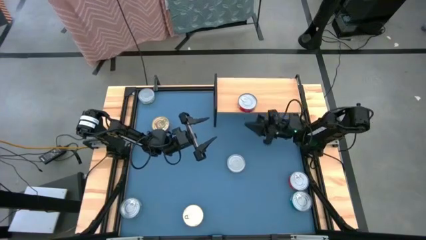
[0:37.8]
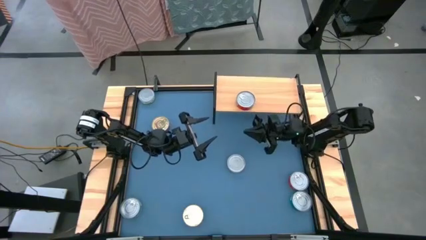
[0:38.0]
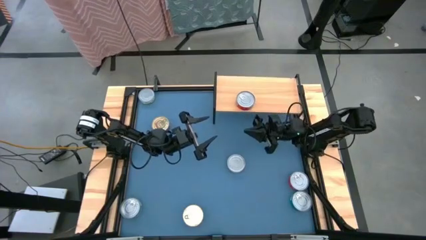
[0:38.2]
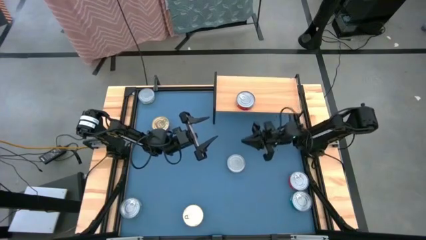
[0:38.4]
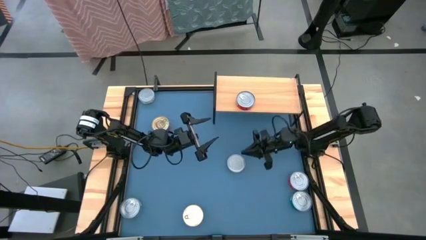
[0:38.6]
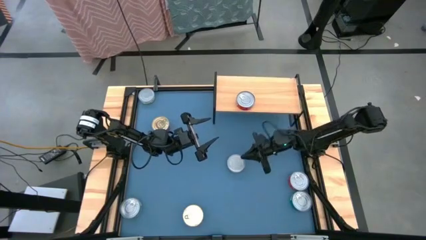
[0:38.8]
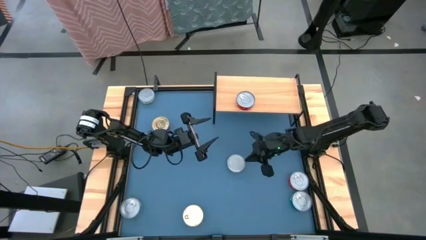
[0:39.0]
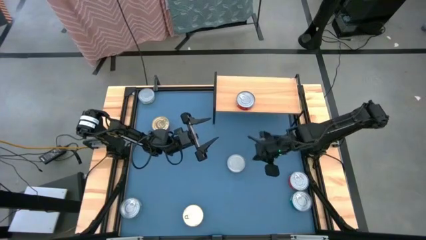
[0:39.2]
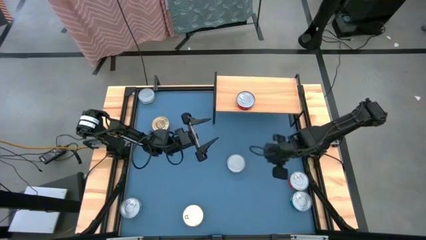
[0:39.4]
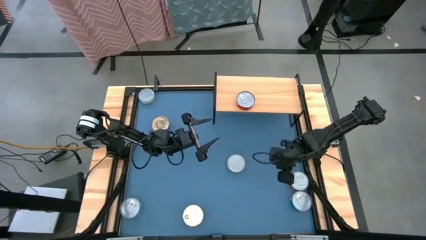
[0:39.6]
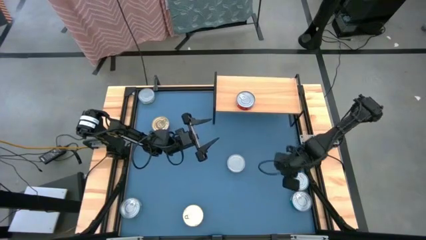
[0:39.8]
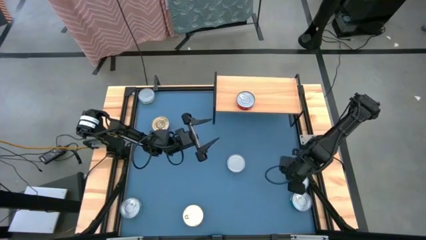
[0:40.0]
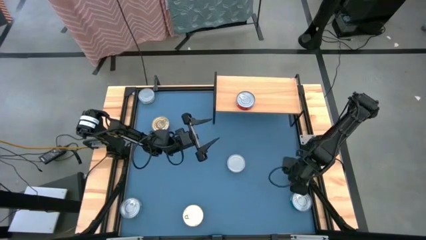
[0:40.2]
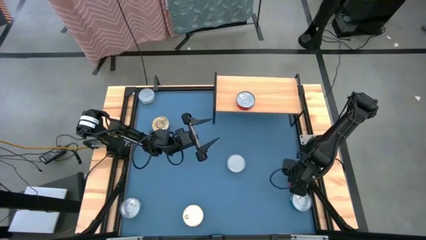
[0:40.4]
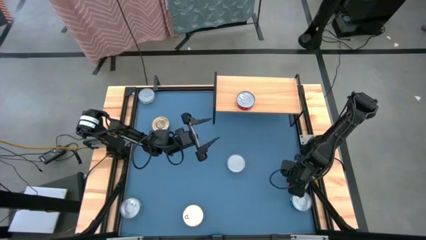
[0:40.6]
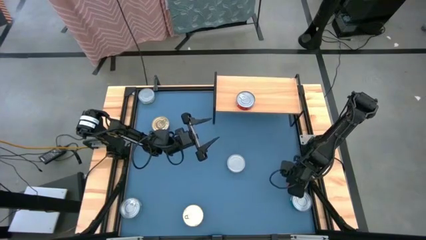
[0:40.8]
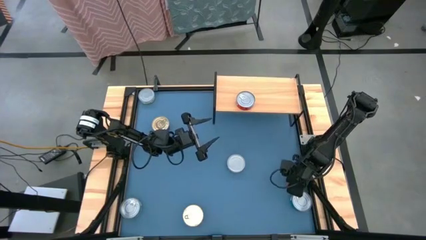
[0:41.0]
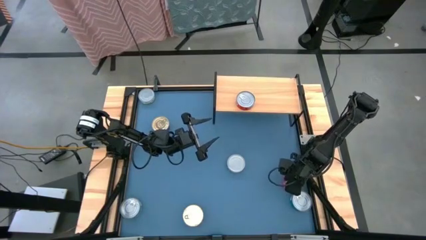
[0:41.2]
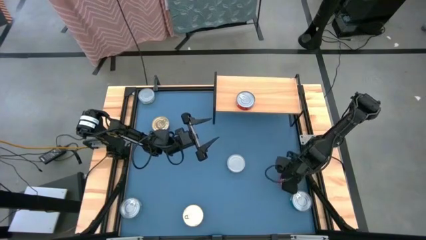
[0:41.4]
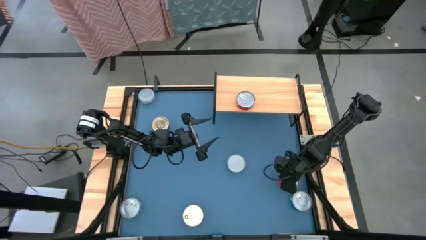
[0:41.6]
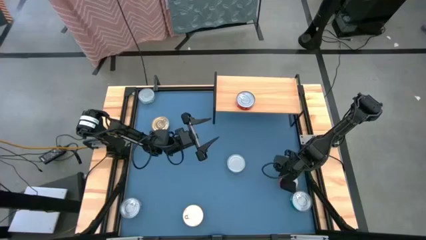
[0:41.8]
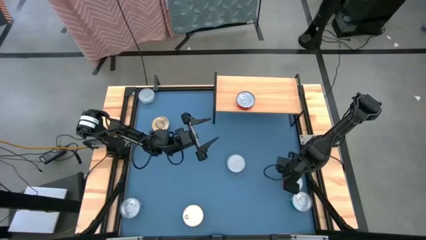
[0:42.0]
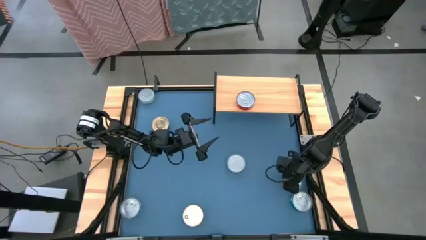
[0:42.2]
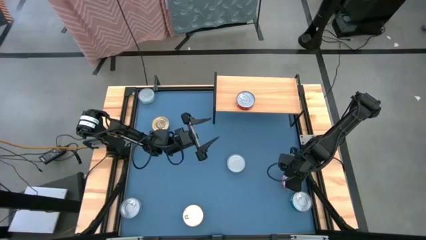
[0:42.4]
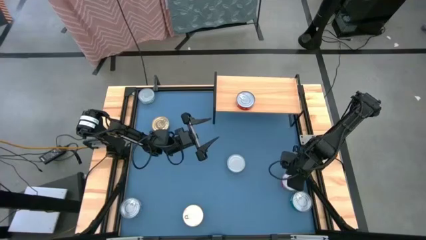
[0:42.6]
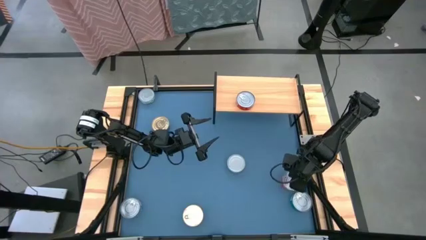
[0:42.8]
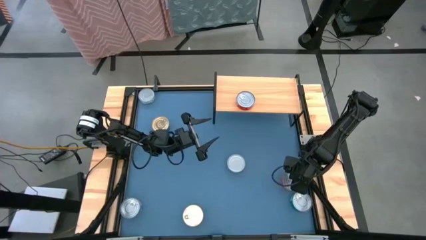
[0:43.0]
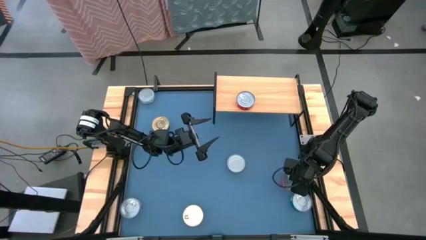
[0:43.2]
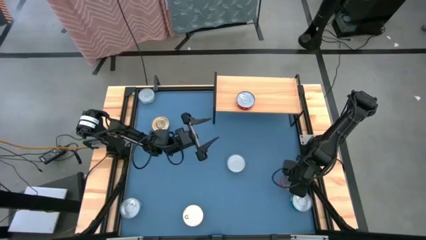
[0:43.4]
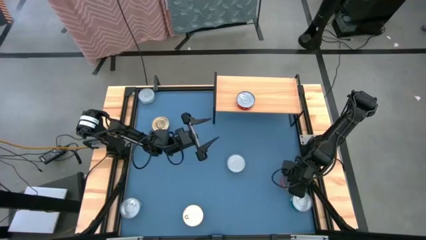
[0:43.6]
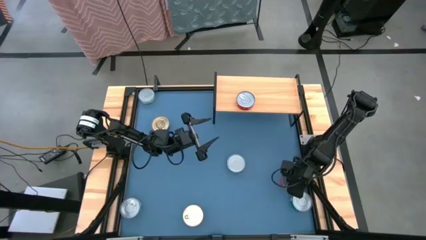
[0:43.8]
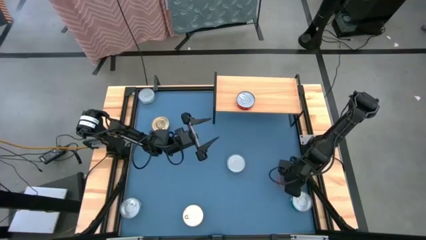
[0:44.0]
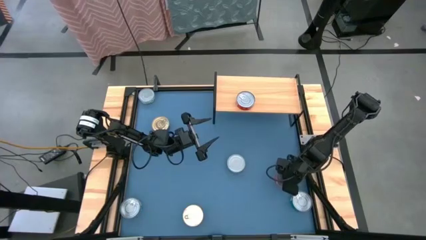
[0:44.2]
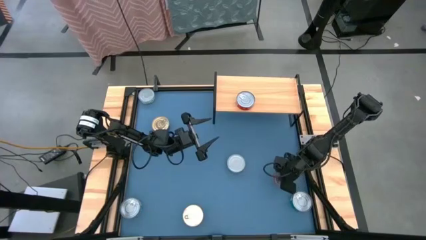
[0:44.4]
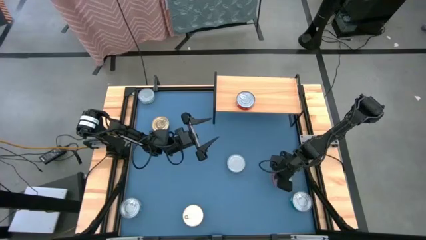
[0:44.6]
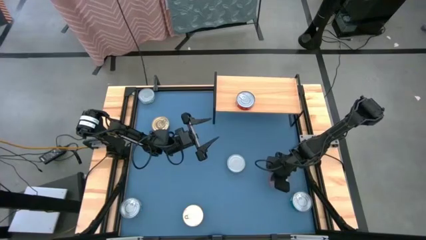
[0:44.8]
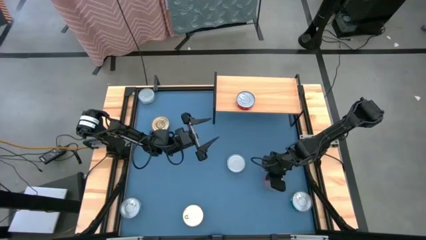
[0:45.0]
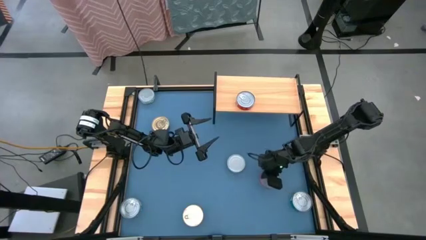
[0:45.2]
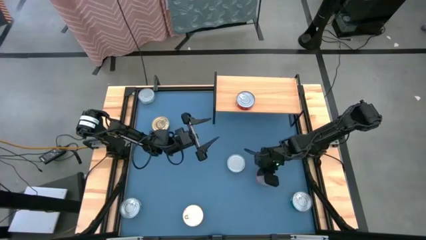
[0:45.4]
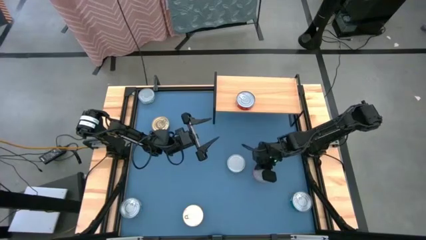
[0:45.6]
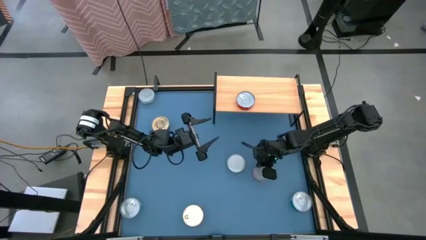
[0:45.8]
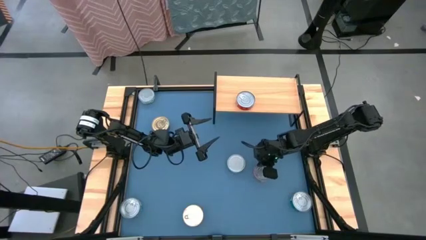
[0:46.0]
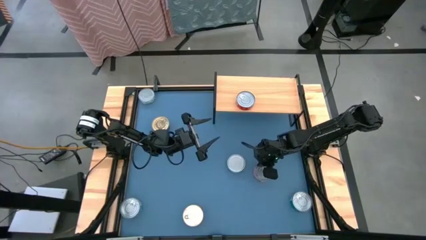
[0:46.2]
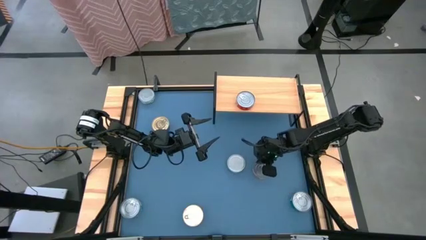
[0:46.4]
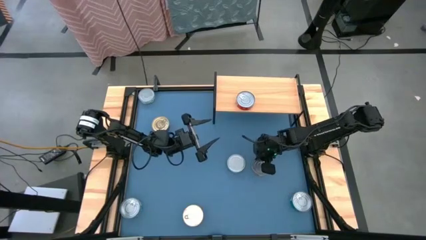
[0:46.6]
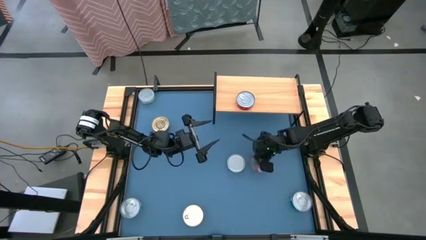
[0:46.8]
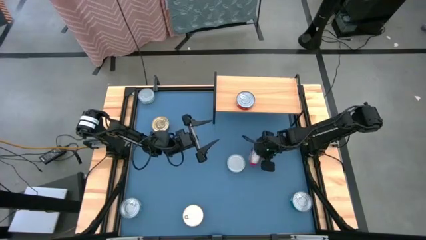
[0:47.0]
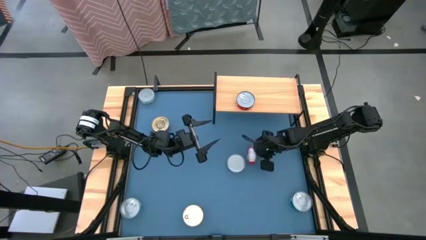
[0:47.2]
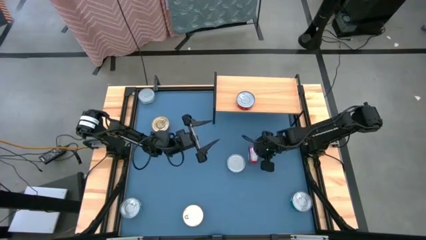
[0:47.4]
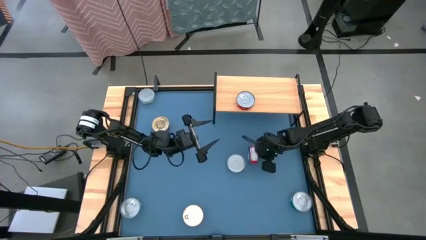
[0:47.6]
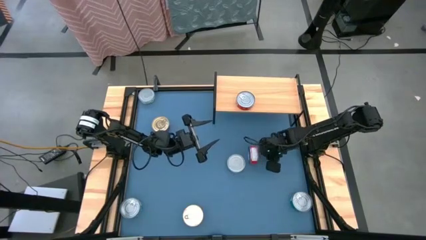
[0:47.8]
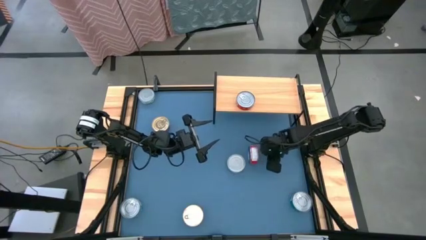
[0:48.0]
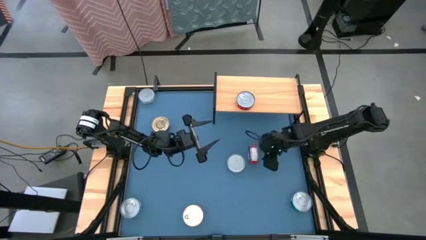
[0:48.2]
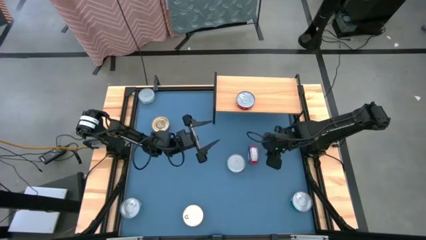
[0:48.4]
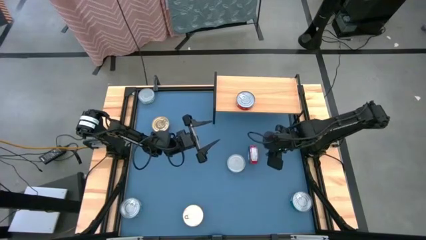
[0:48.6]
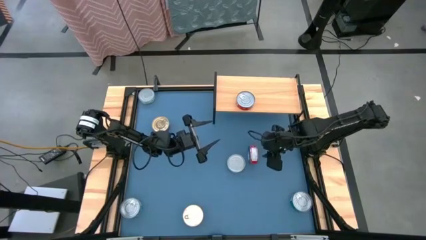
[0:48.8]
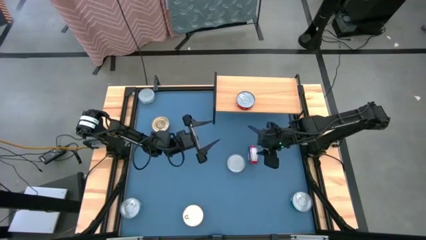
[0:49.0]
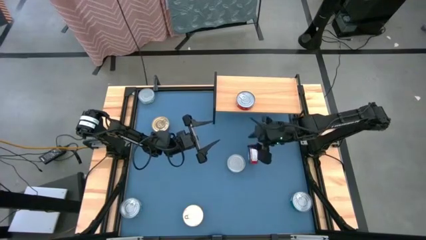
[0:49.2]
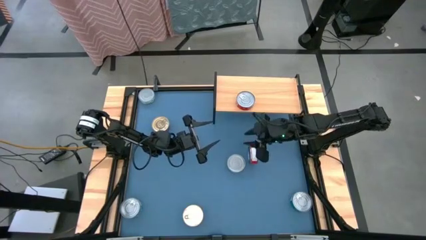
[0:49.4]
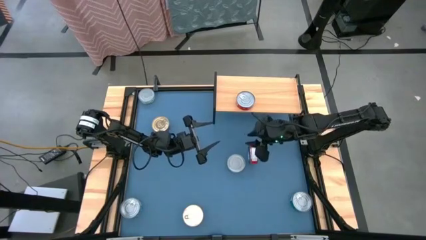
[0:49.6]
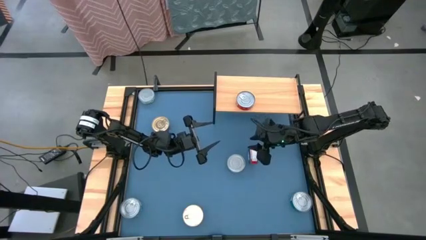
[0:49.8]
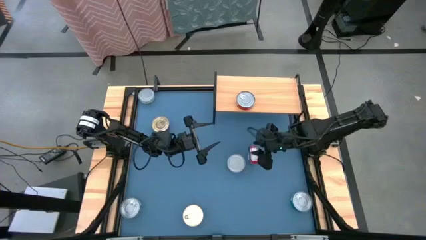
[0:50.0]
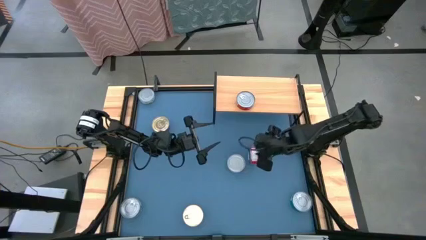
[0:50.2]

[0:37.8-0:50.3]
Task: Stack canned seafood by type on shelf
Stack the red tuna can on top of the red tuna can on the shelf

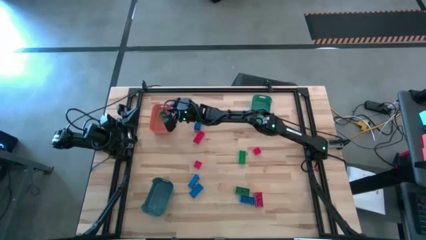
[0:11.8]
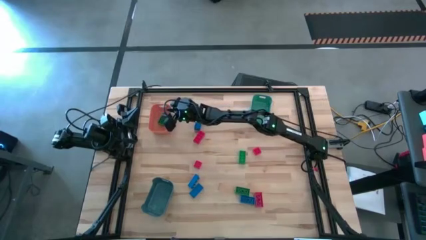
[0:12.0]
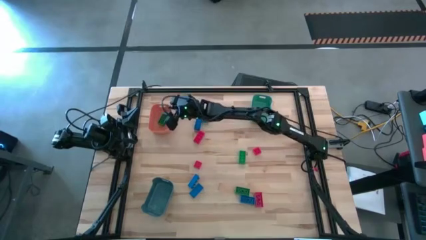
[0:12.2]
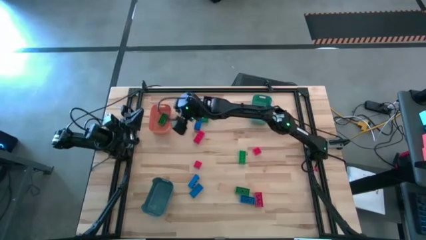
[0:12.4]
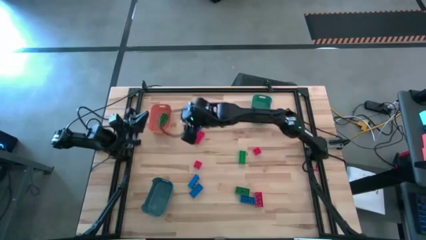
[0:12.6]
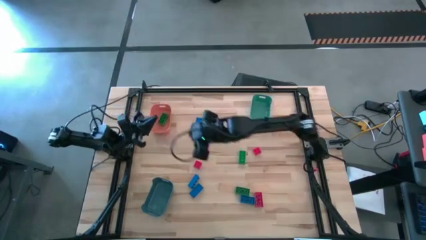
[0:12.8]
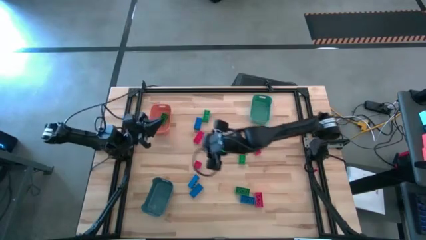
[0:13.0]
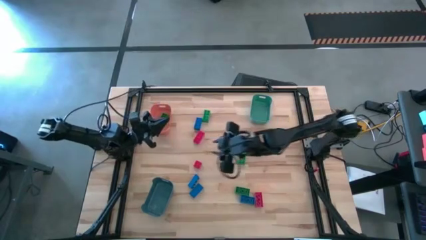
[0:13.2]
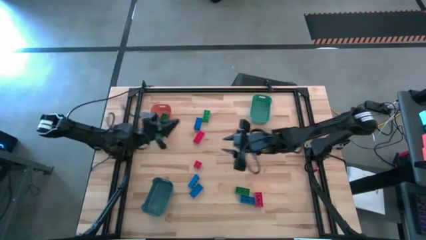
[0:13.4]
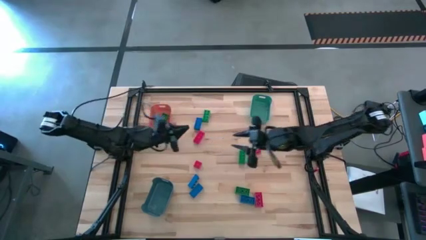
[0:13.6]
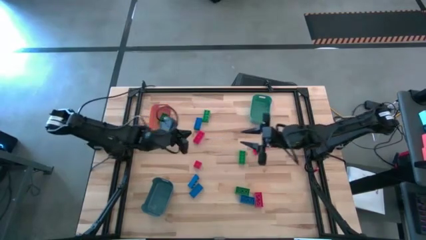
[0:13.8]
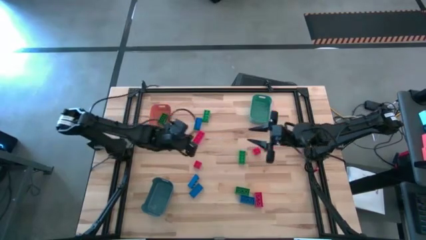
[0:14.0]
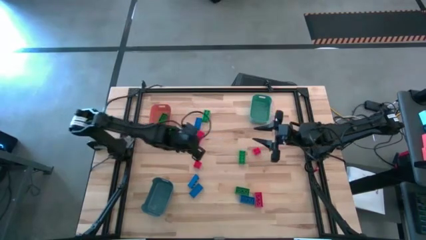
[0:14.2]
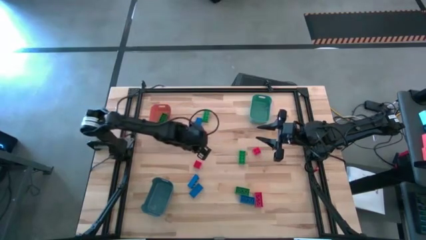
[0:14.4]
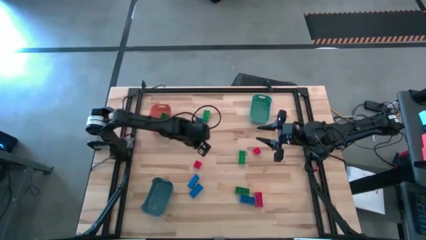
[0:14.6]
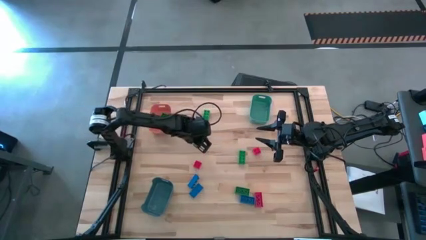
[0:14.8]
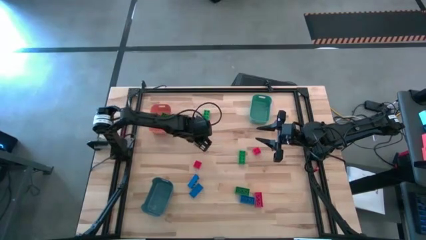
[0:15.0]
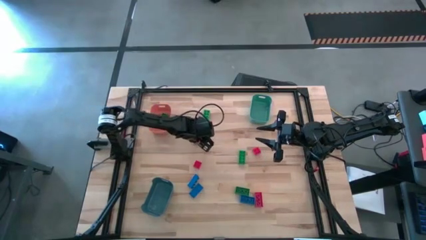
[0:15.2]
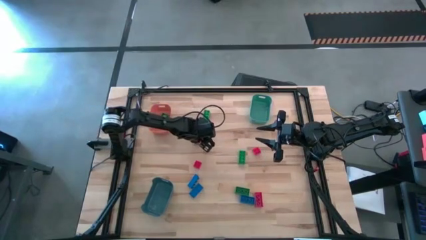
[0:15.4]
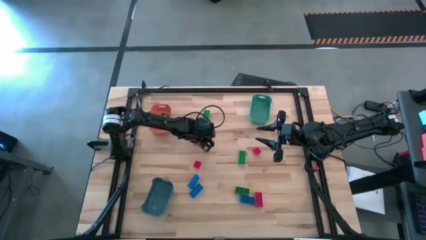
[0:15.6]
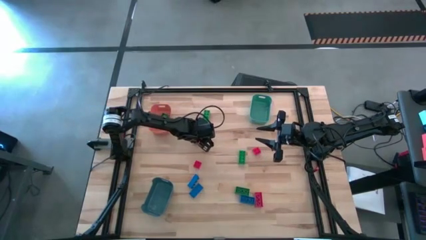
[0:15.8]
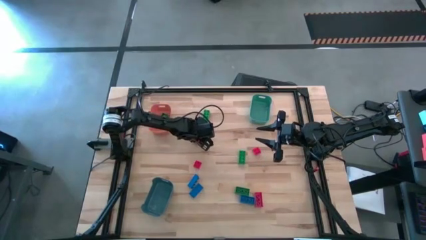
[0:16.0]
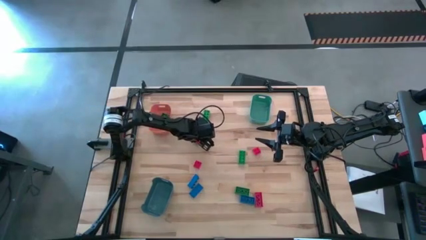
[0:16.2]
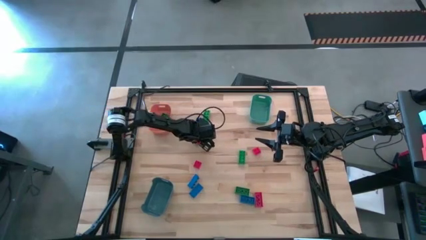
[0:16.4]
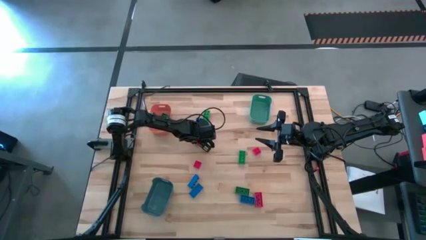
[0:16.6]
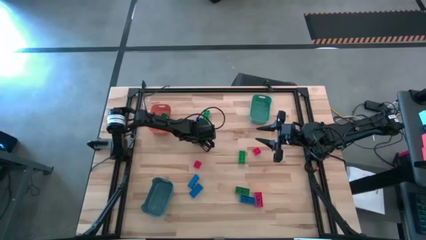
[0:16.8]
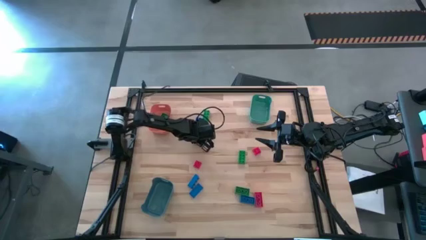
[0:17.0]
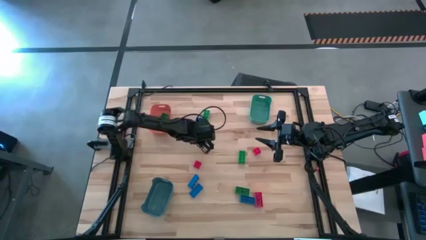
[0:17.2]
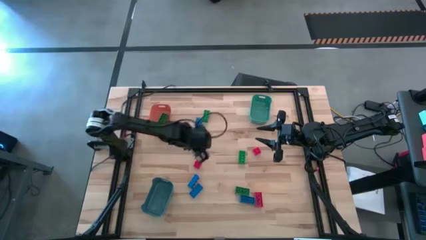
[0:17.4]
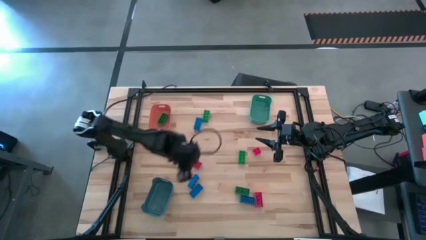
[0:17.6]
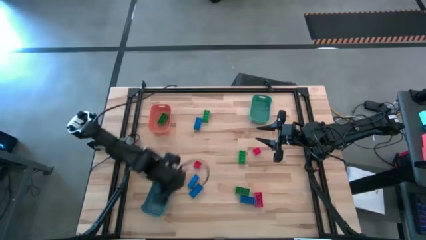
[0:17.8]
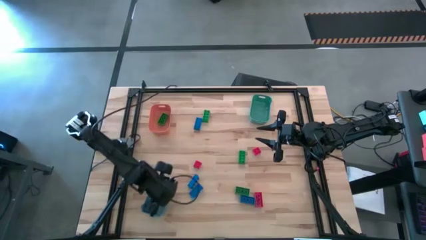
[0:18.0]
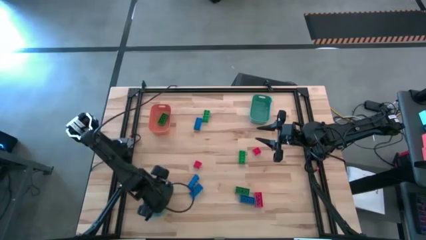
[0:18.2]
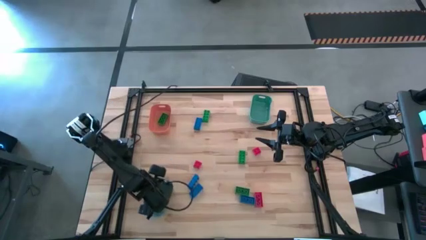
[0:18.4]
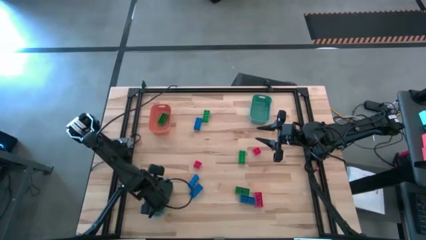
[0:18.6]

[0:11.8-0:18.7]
Task: Sort & place blocks by color
Put the red game piece into the blue bin
